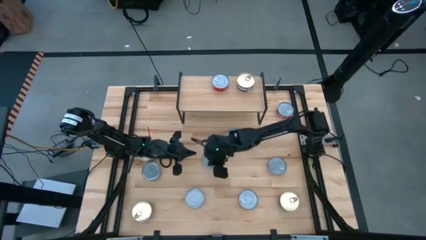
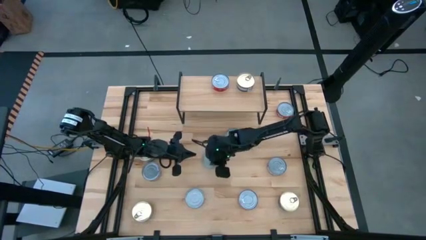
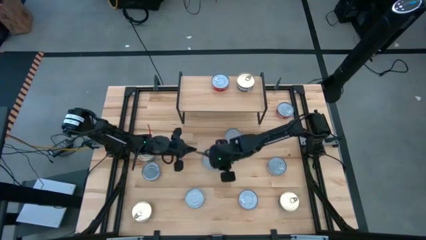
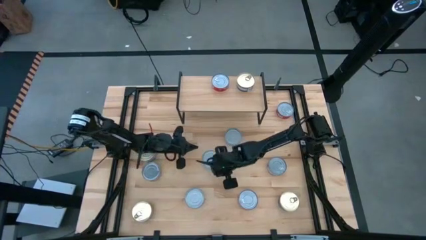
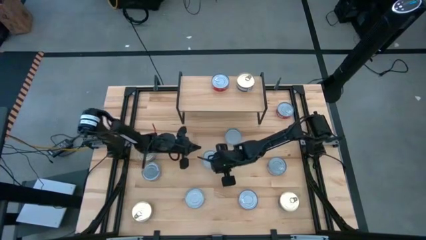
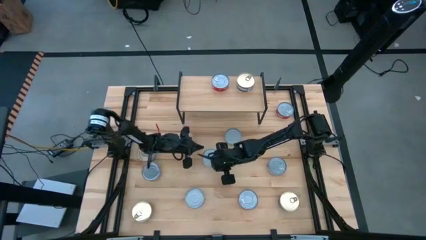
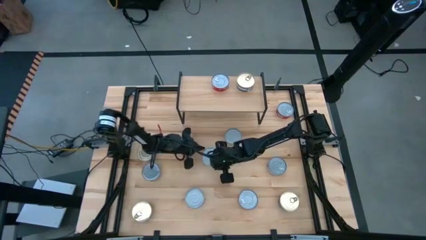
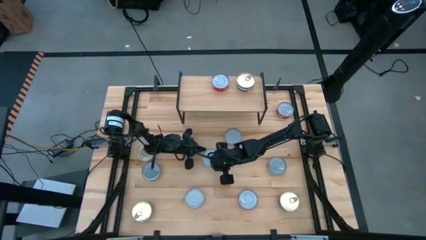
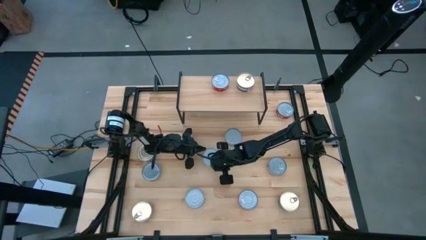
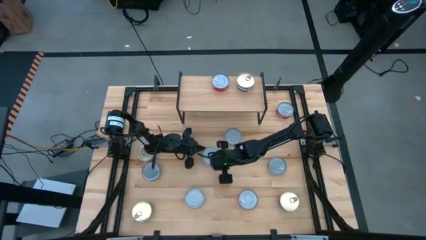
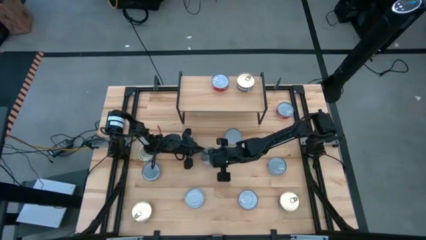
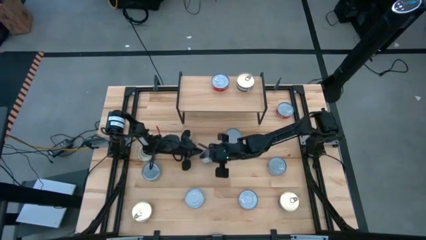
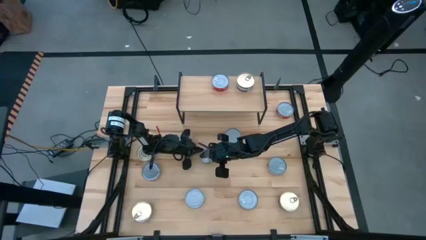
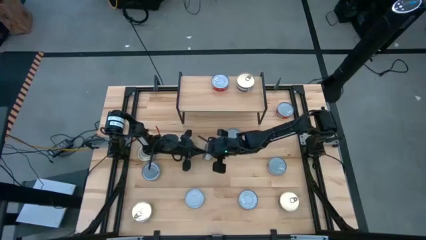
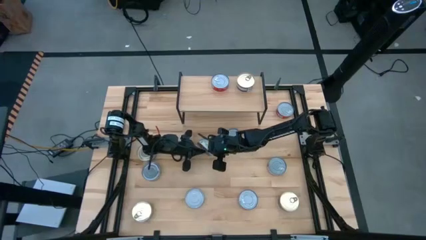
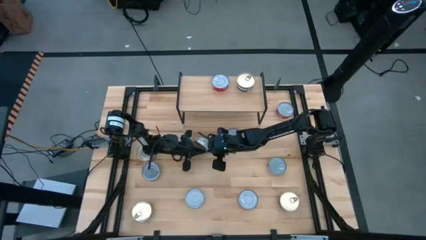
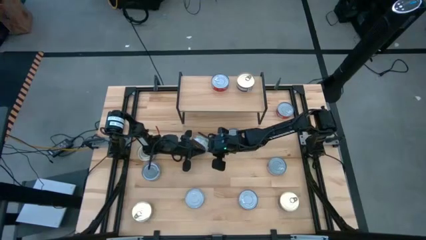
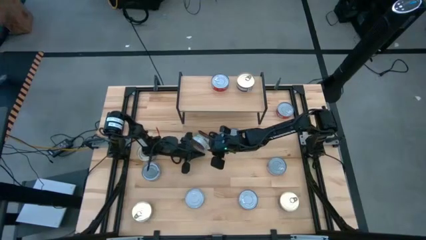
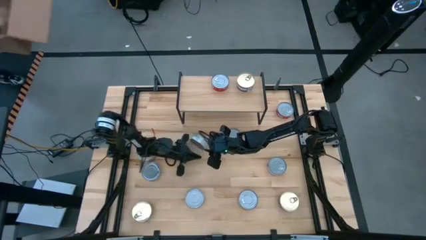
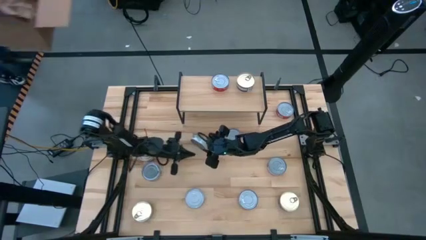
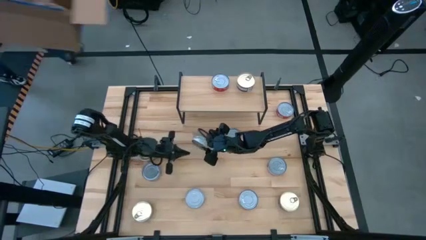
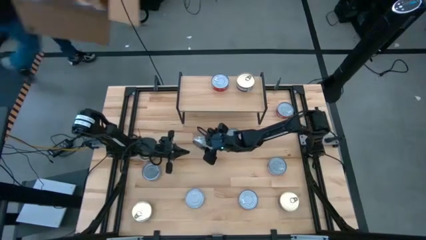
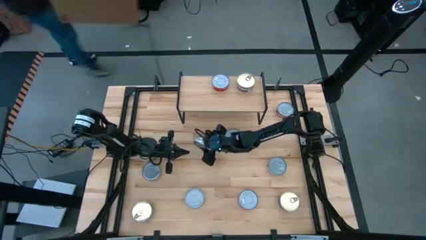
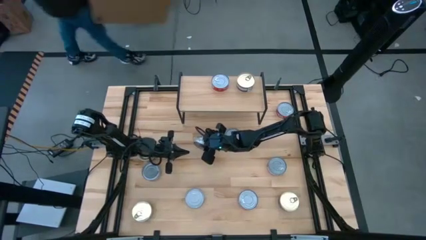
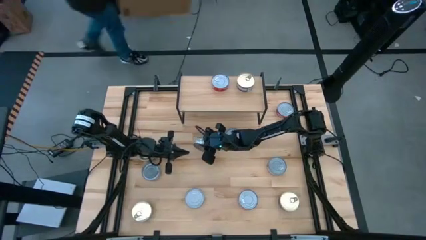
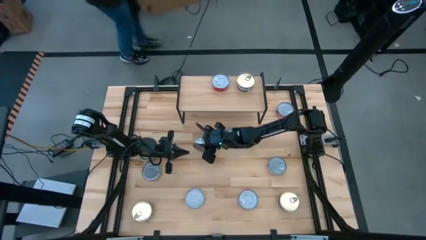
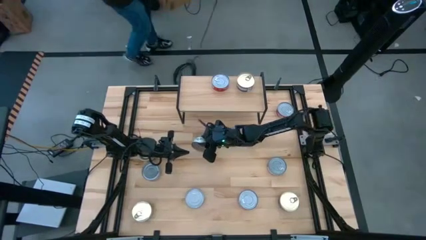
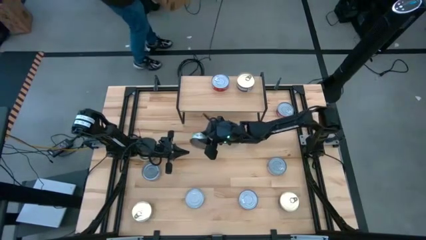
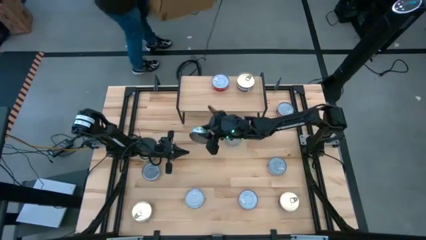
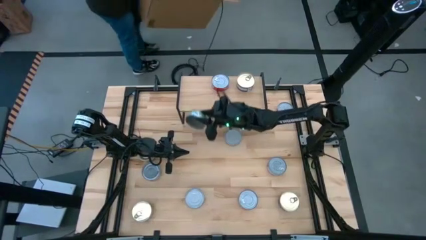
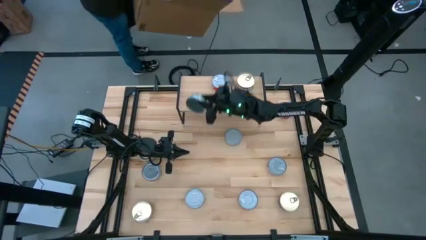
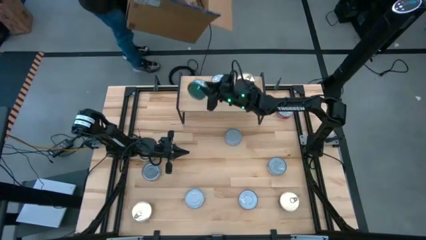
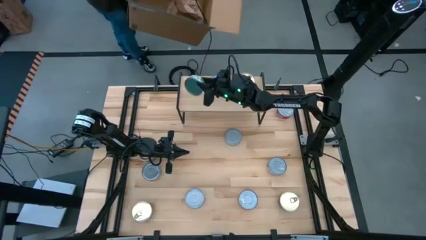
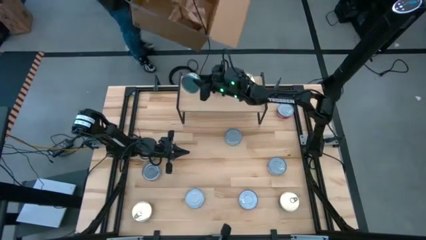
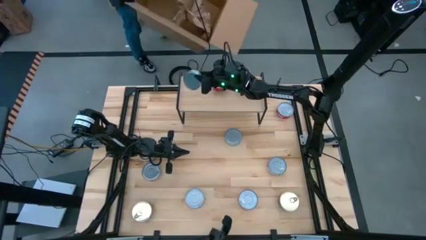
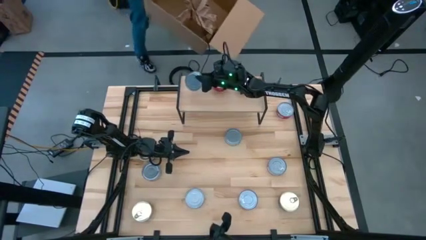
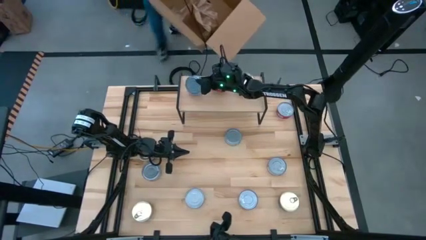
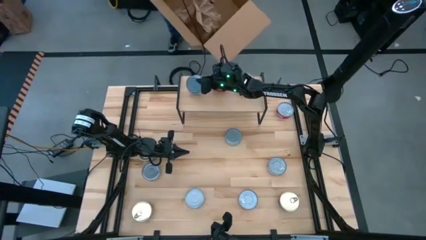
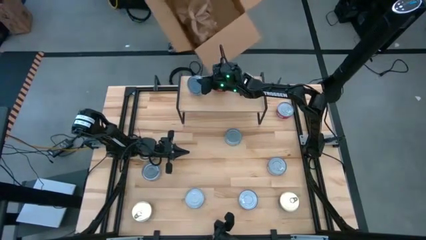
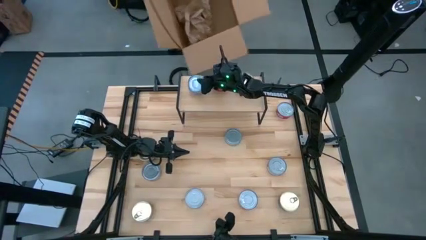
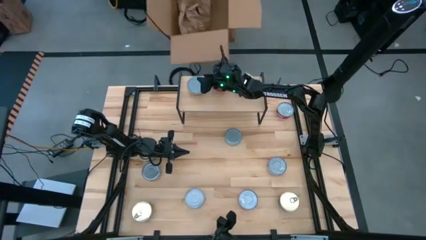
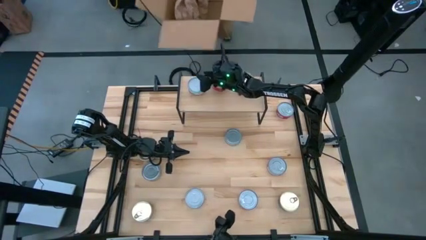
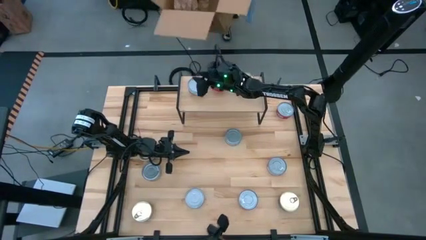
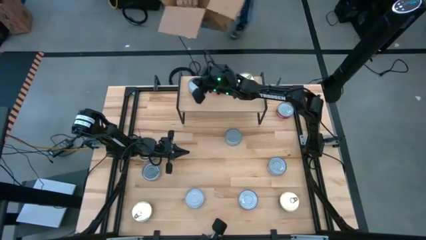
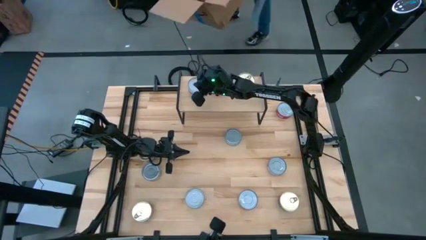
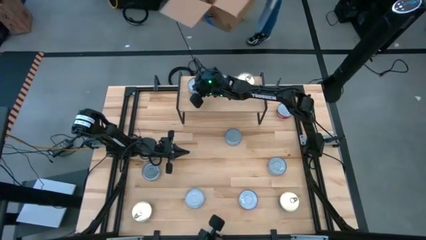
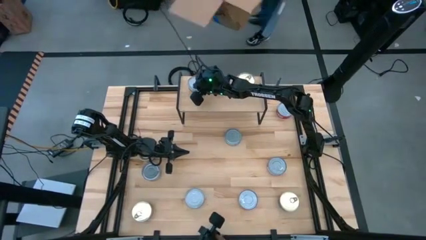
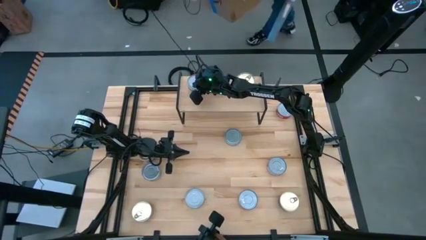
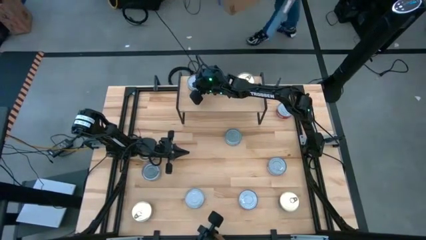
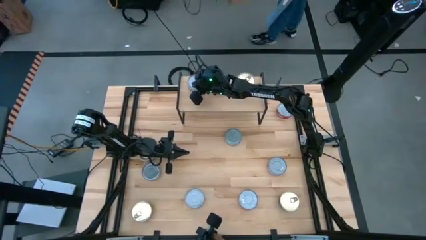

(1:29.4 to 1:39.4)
Task: Stack canned seafood by type on shelf
Put the green and white tuna can on the shelf

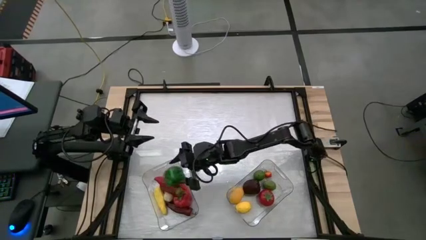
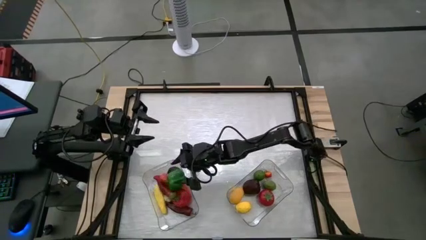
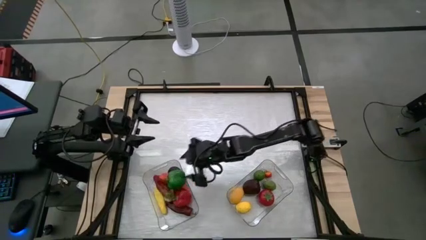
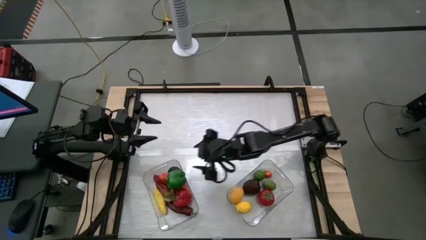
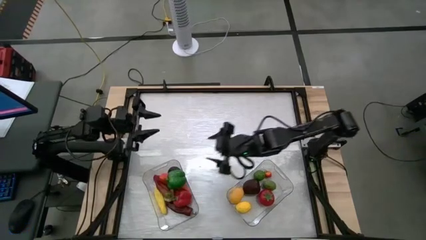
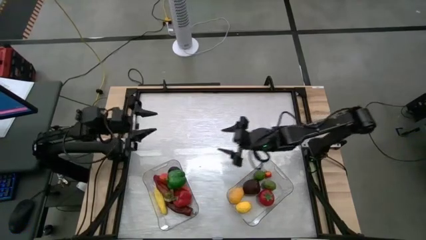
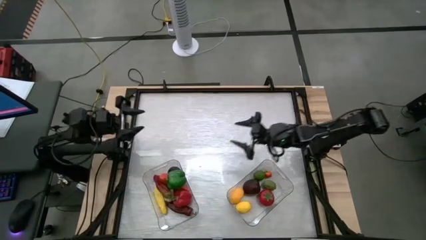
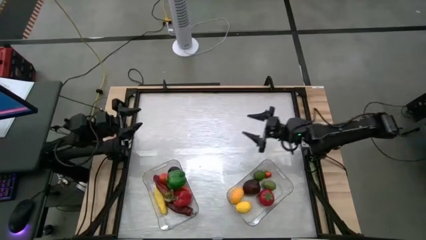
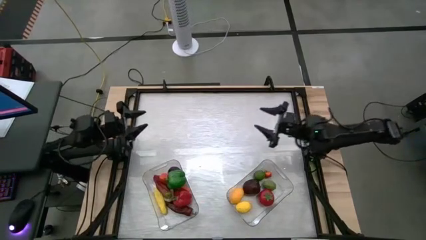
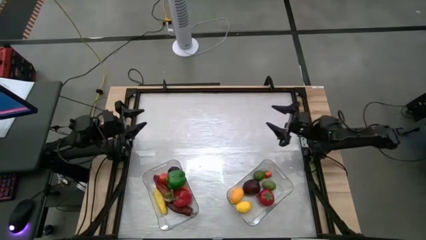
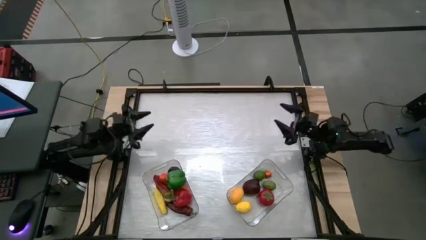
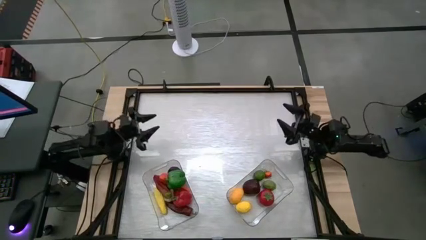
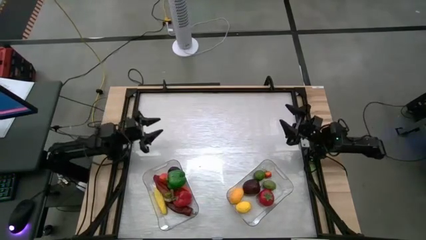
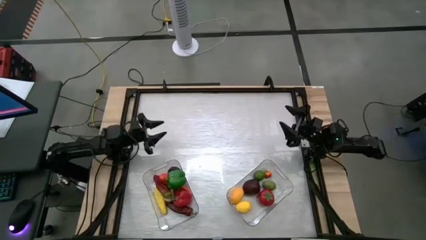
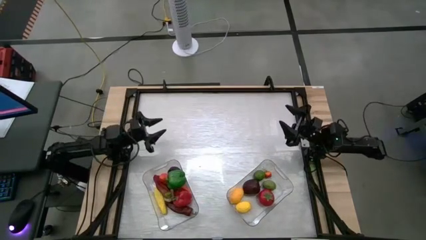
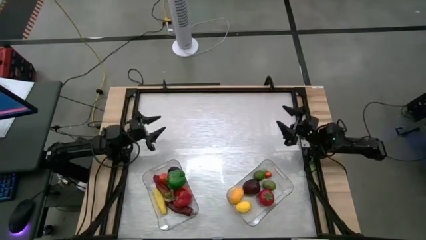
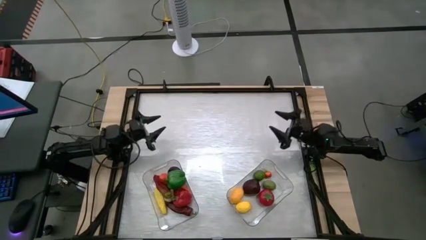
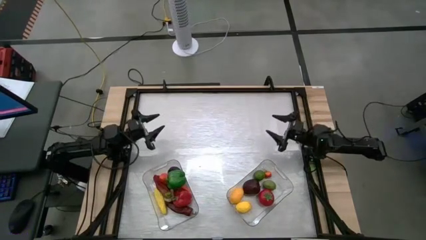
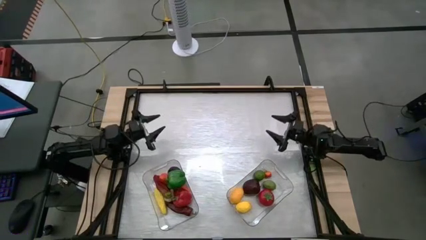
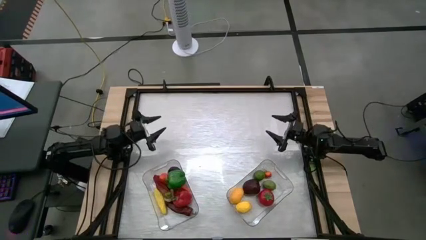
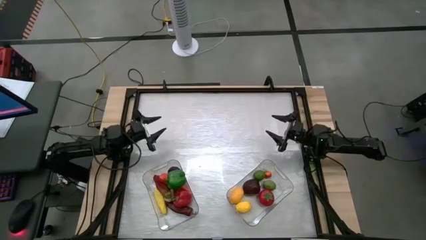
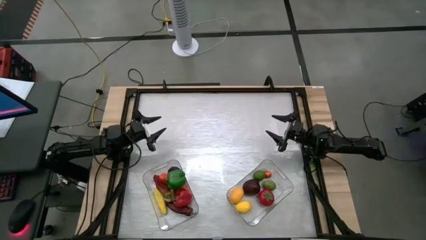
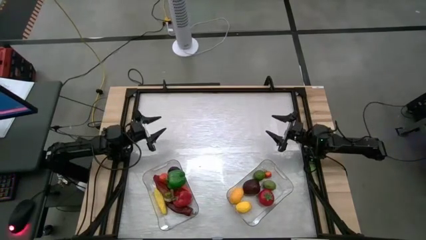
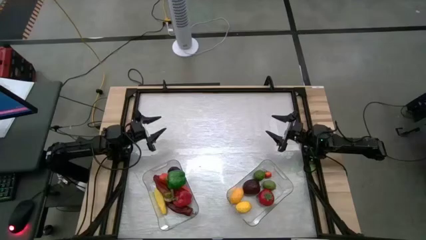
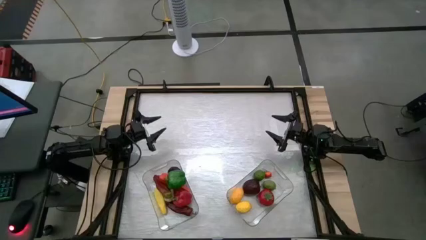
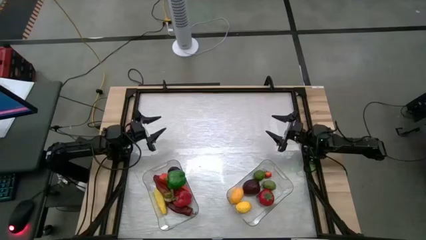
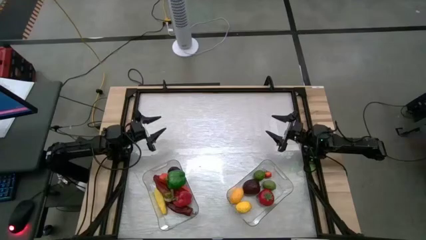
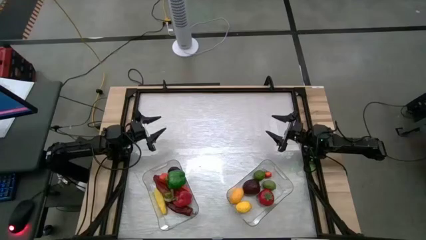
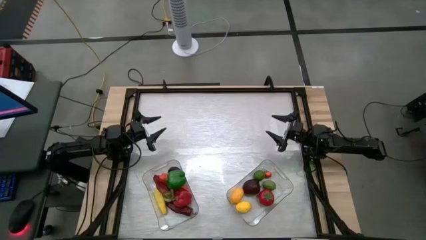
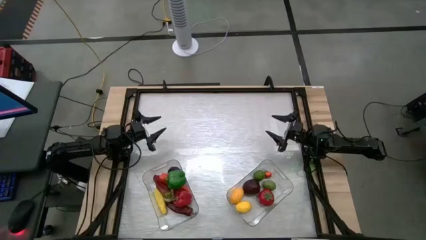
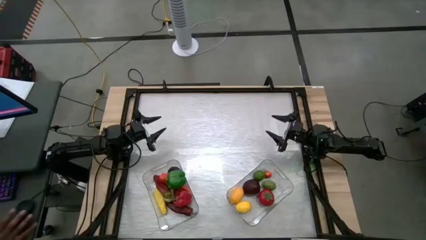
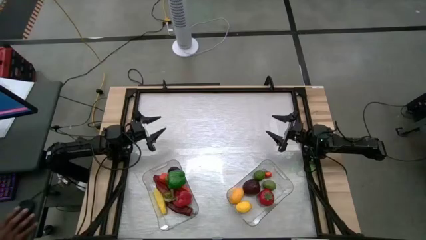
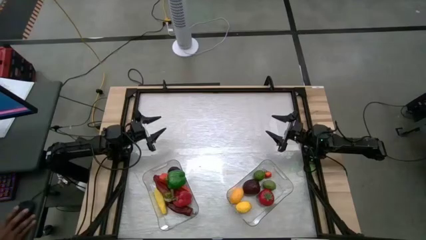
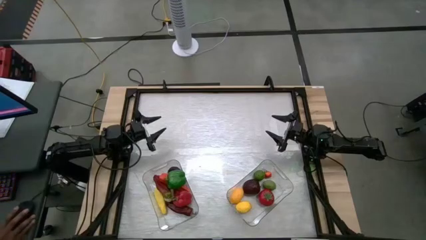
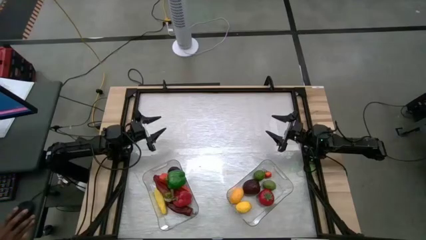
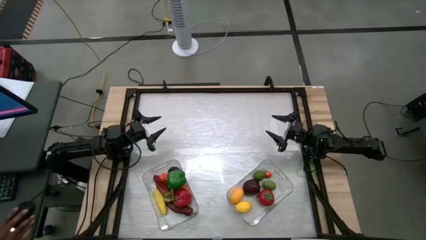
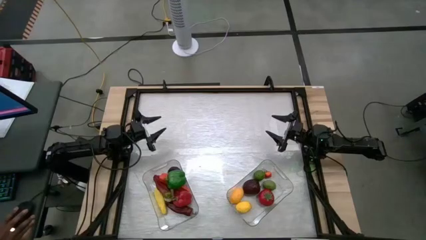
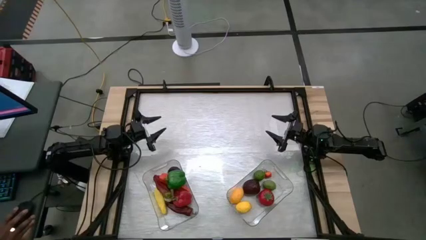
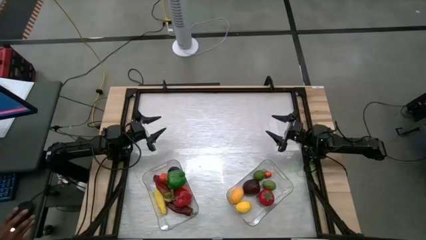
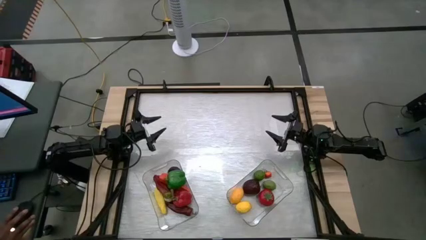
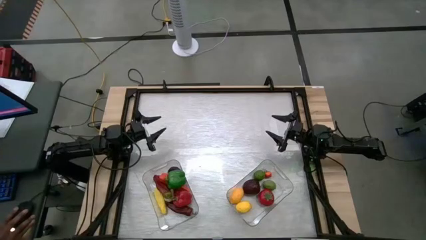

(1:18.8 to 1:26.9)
Task: Sort produce into baskets
Return to Home Position
